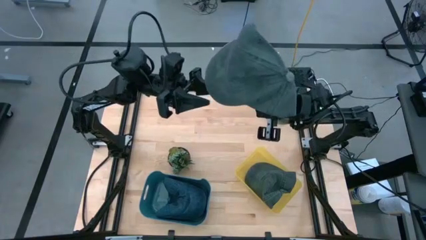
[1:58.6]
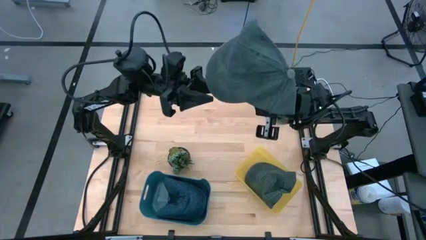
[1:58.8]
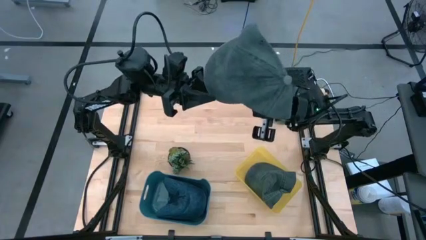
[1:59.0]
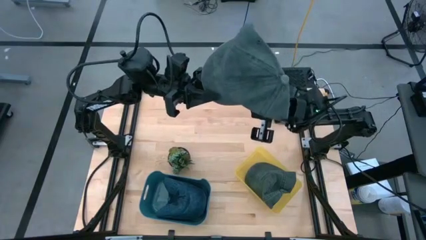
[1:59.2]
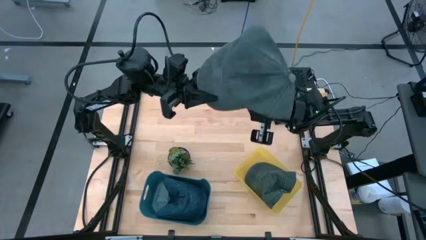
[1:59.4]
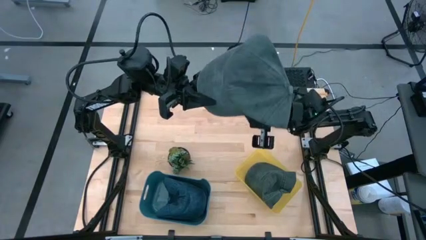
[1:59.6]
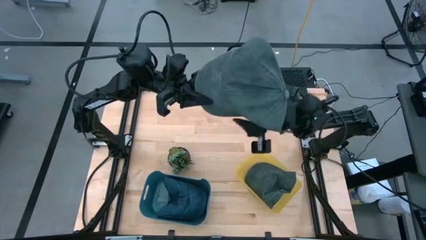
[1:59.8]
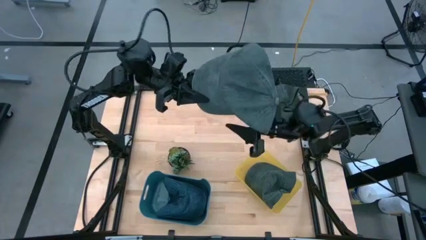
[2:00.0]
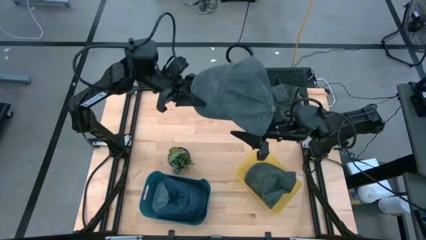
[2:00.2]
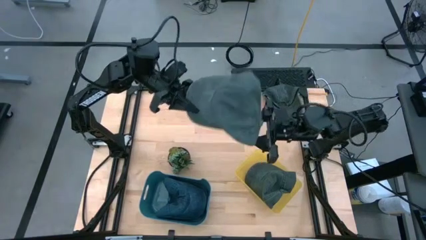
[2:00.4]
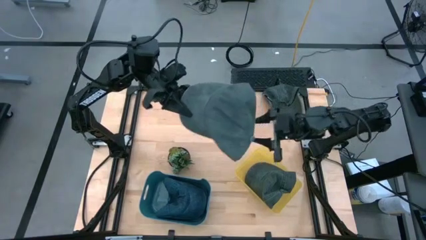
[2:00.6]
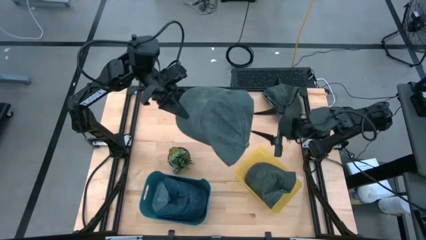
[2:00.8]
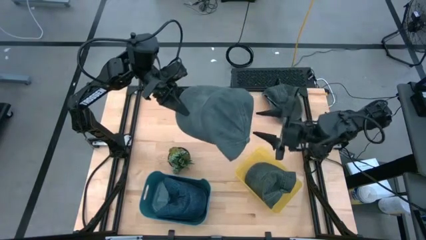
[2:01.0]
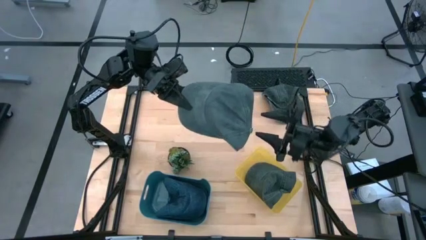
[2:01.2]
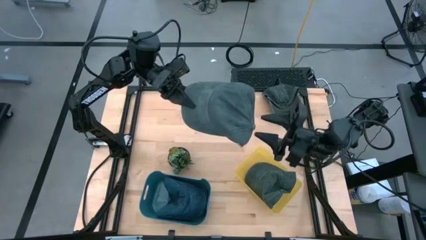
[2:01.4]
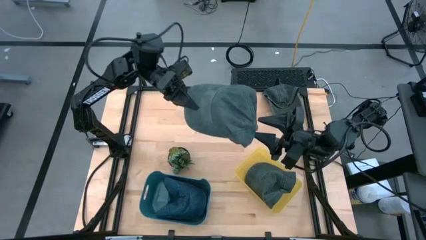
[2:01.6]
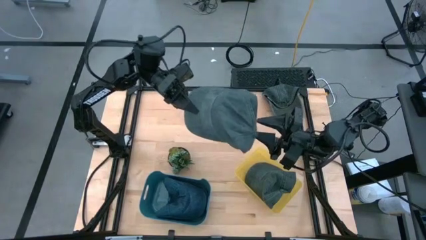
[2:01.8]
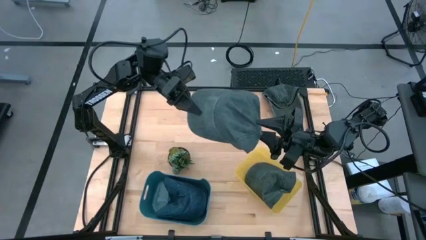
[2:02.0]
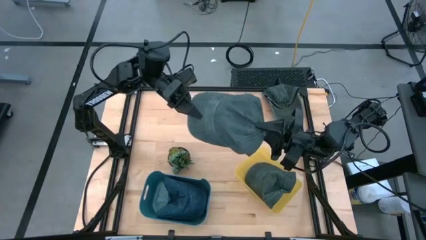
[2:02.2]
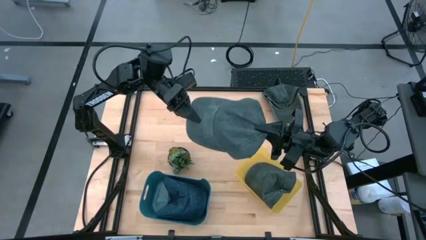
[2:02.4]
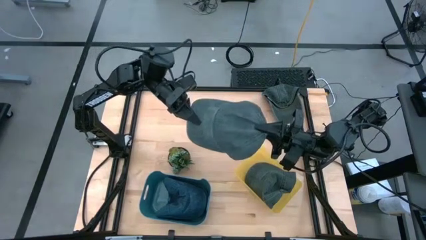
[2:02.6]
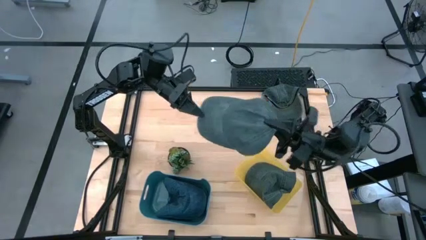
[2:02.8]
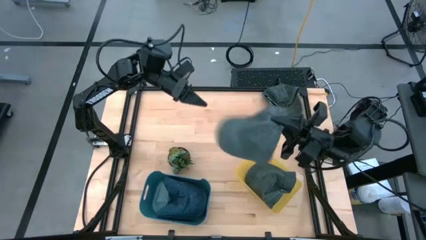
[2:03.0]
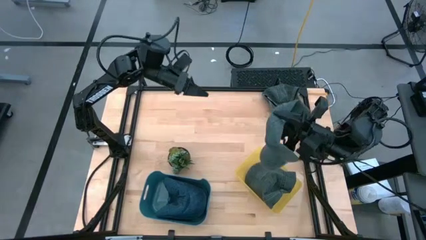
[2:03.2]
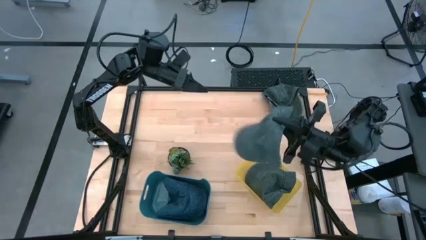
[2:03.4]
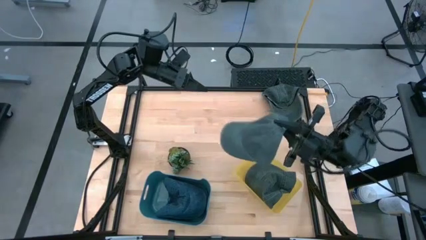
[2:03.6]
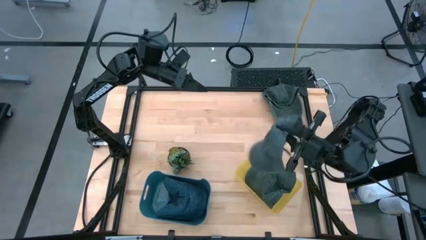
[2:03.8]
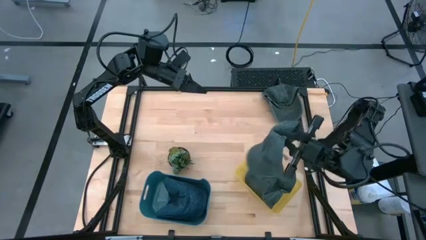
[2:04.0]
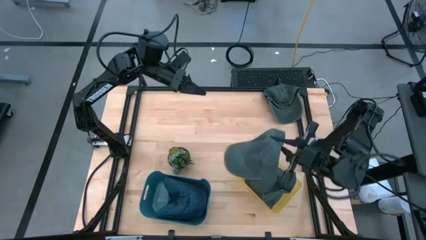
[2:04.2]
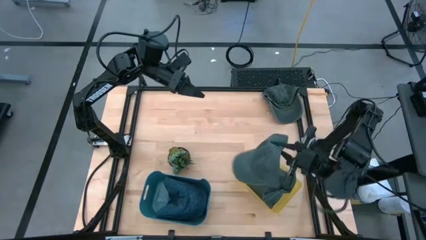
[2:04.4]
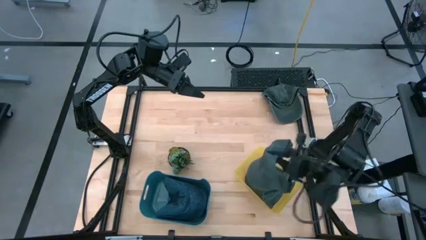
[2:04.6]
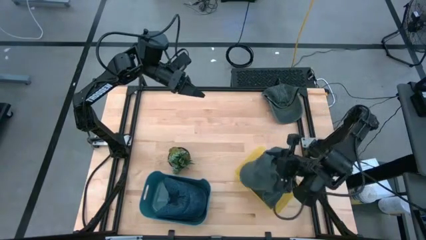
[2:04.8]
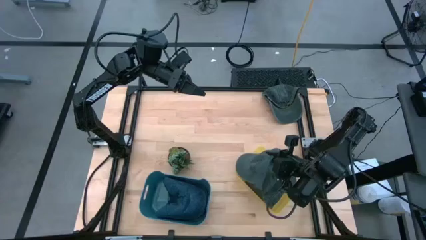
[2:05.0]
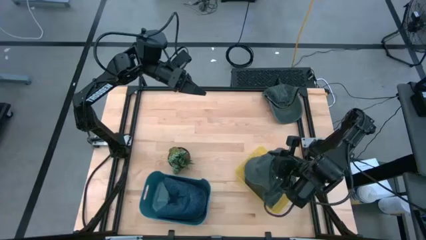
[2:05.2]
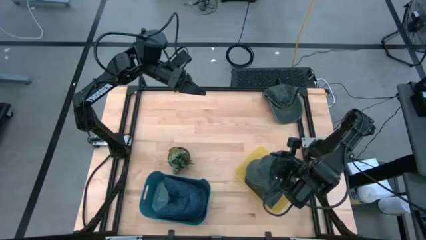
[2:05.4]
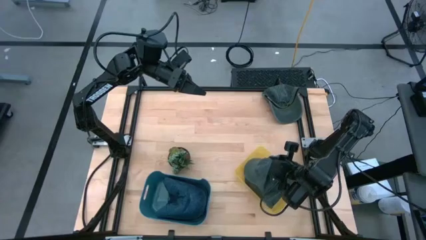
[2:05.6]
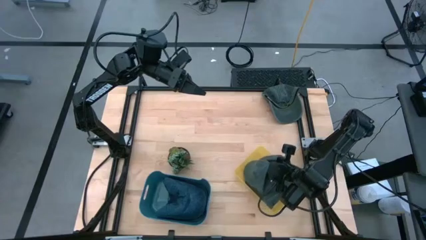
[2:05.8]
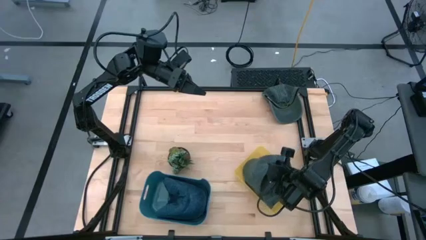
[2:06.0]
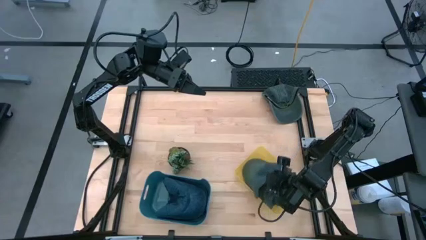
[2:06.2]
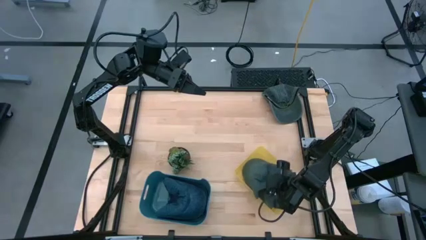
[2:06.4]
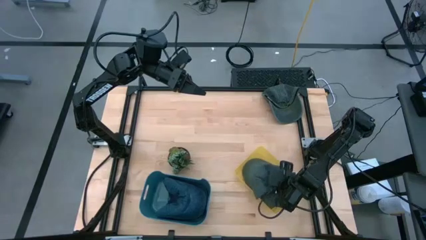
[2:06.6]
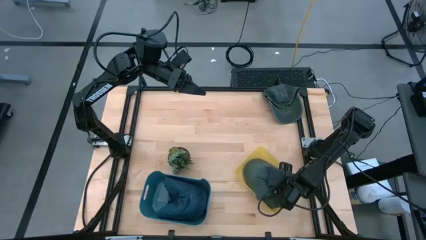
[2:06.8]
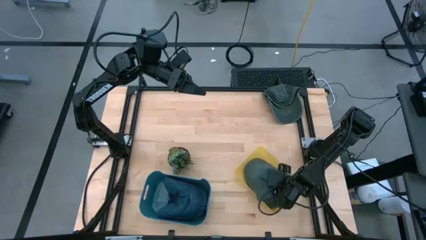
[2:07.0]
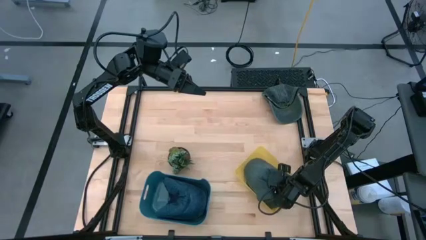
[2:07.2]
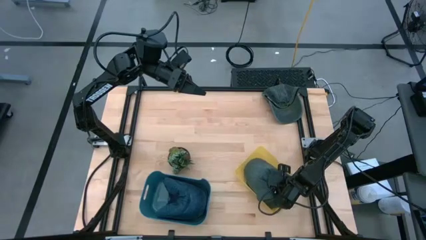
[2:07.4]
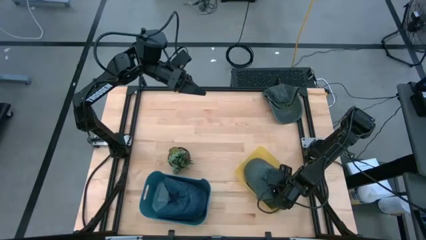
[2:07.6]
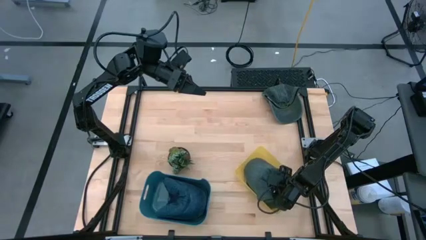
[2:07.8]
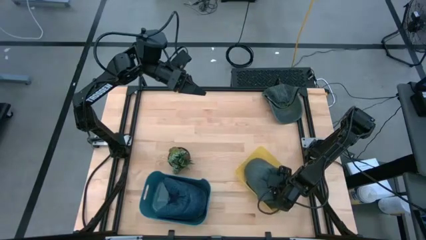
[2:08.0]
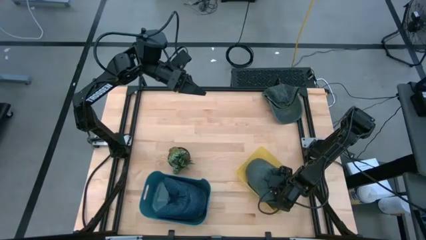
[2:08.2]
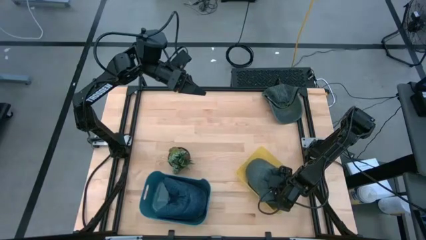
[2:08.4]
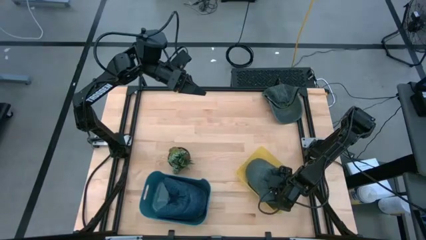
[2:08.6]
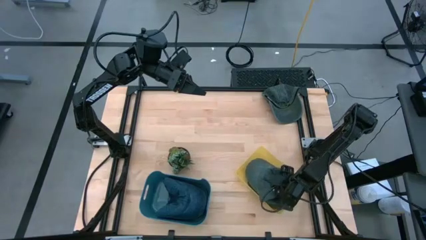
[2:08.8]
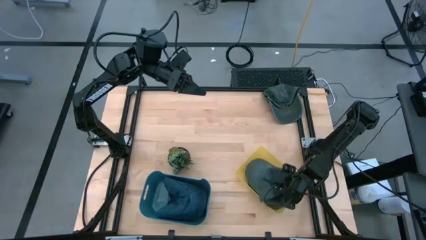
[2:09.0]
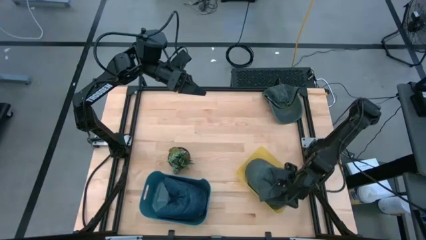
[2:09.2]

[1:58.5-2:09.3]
Task: Pick & Place hat
Put the bottom black cap into the yellow bin

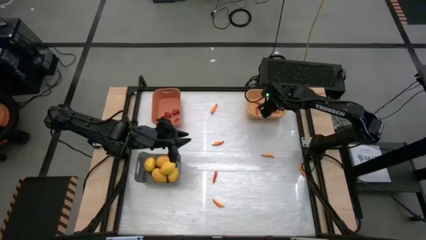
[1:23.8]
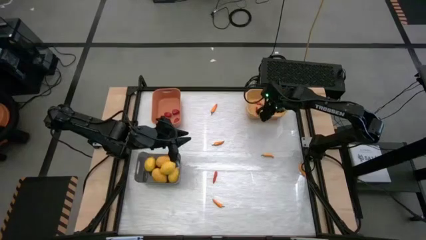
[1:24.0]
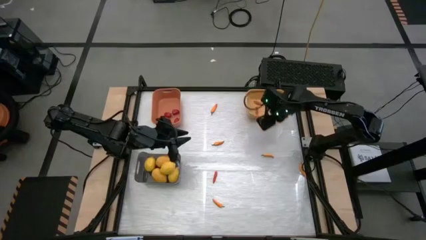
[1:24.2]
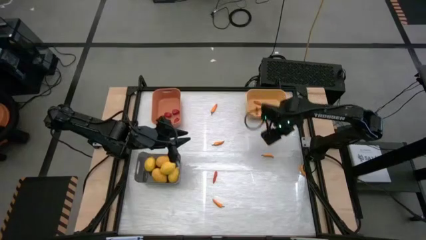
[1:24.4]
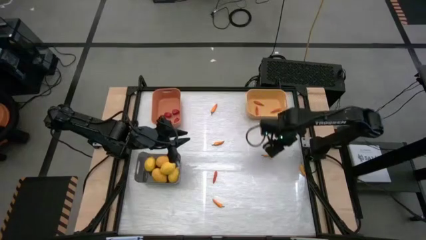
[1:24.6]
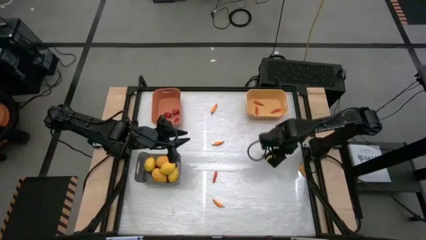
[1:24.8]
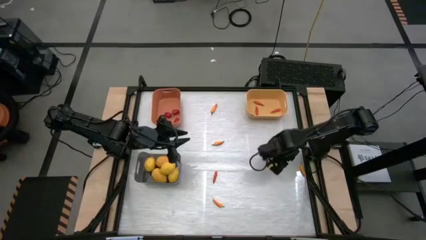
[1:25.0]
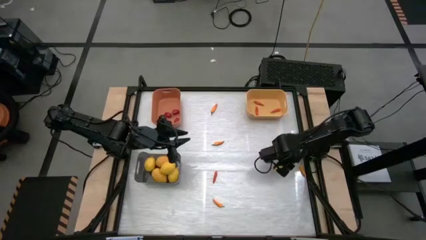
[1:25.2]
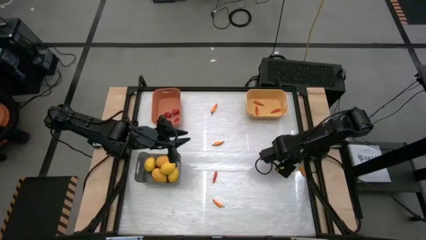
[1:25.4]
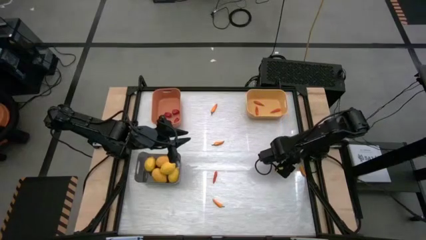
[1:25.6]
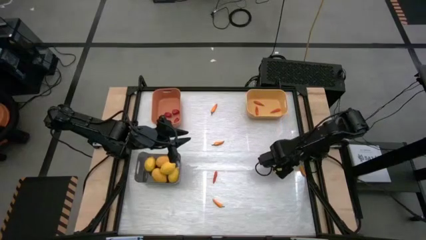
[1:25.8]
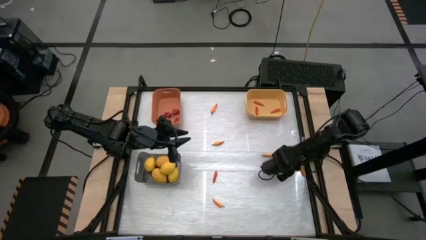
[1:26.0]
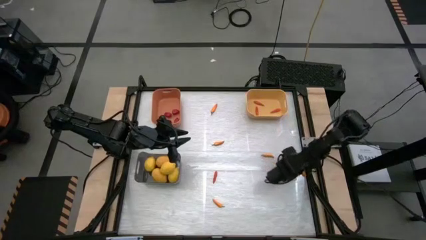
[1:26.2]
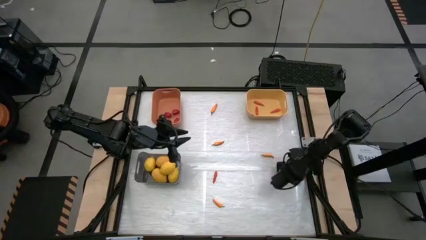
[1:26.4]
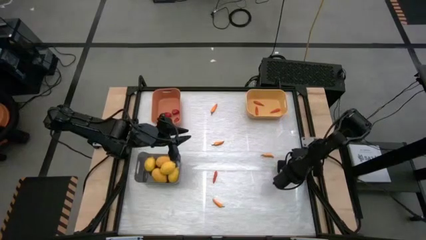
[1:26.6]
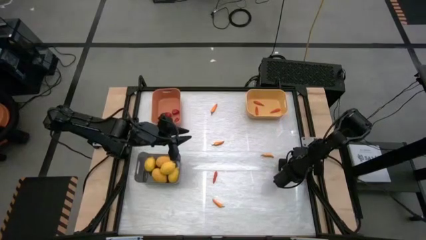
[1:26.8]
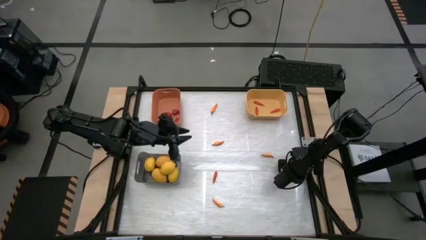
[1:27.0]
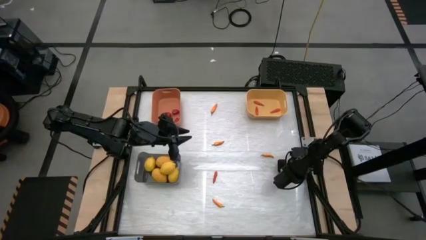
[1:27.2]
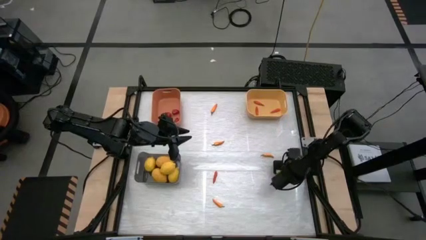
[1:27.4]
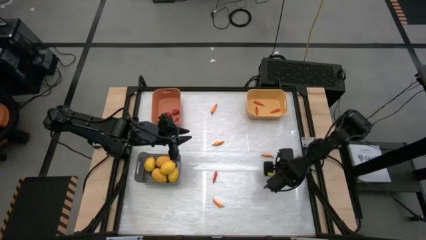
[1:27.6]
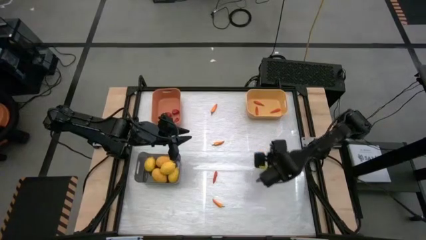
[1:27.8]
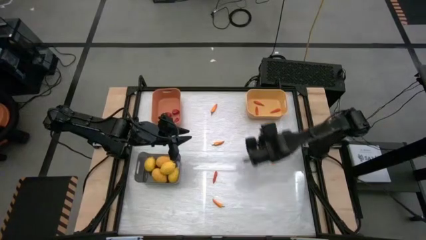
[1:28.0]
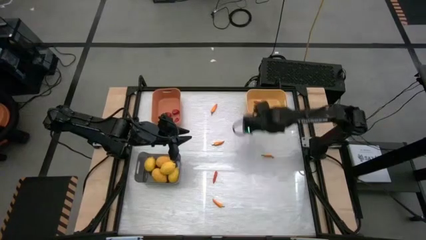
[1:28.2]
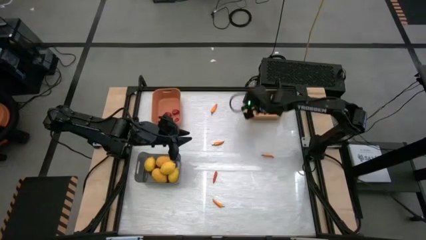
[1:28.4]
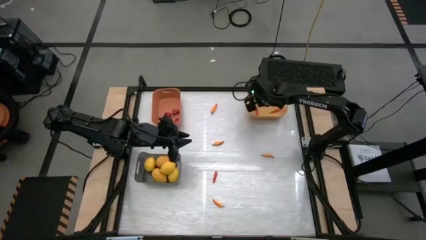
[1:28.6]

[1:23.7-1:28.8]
Task: Sort produce into baskets
Put the yellow chili pepper into the yellow bin
